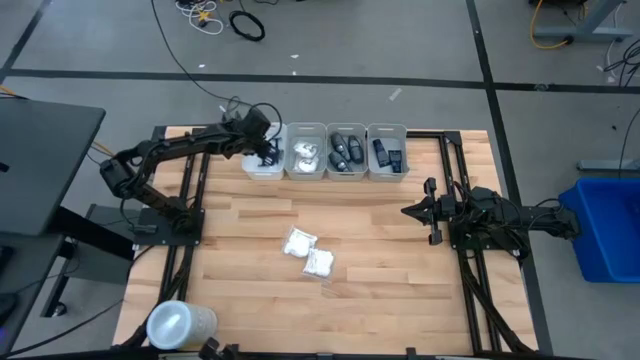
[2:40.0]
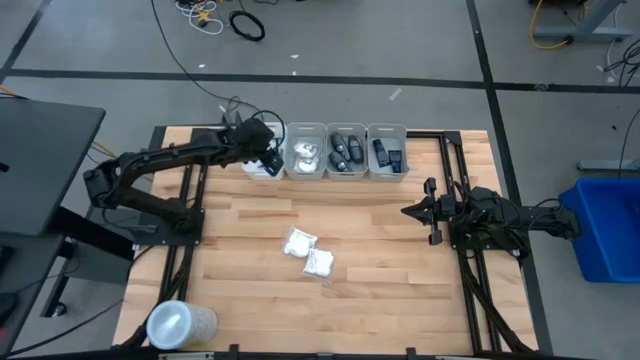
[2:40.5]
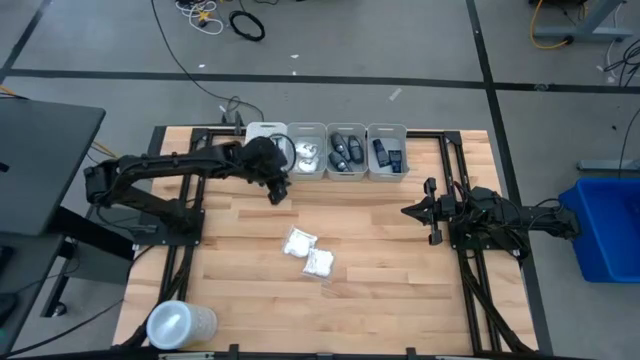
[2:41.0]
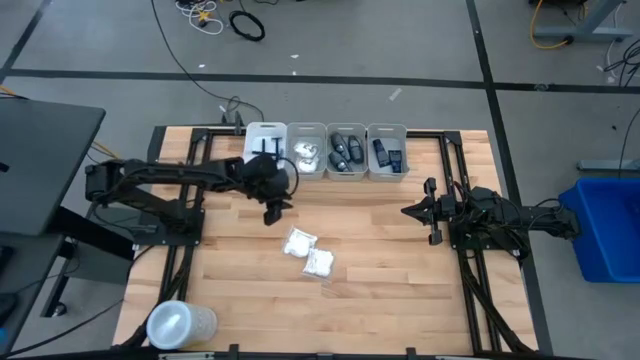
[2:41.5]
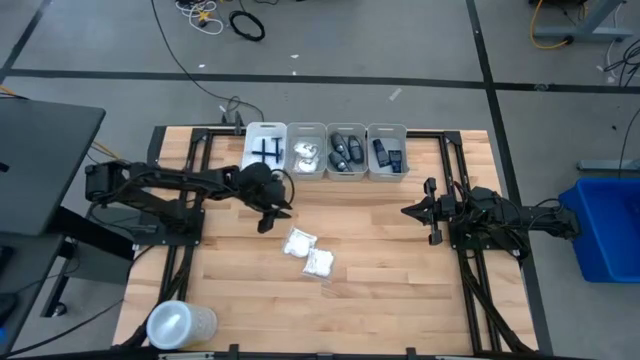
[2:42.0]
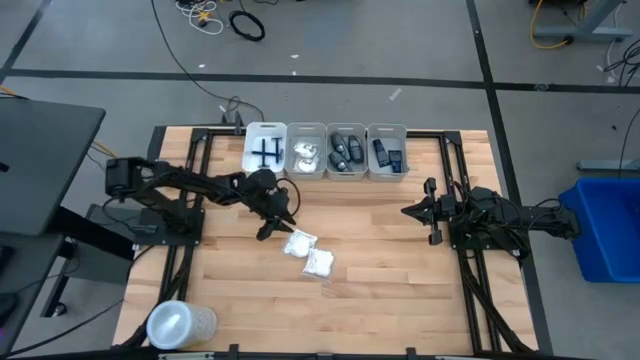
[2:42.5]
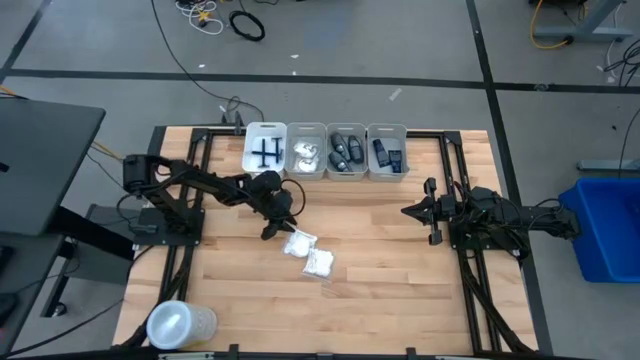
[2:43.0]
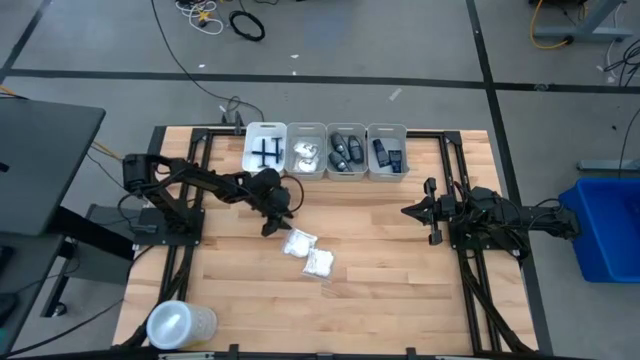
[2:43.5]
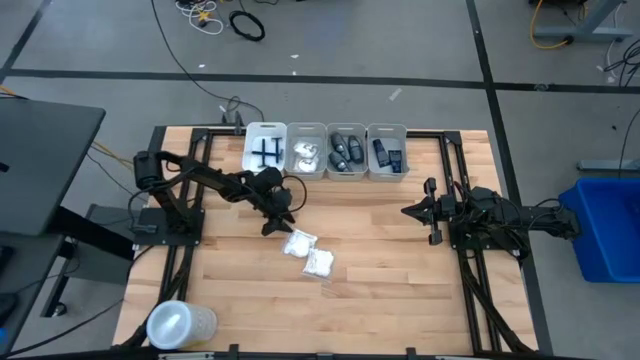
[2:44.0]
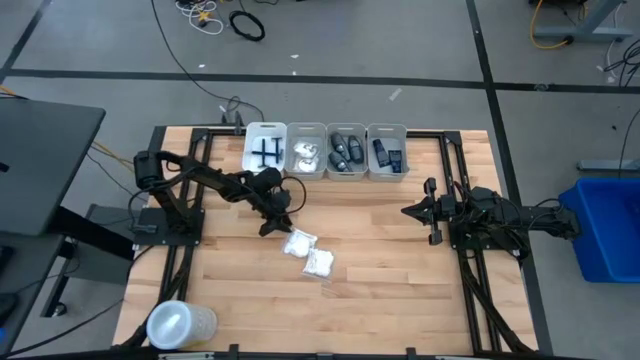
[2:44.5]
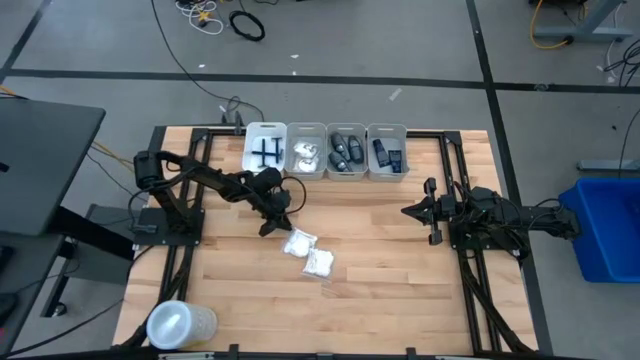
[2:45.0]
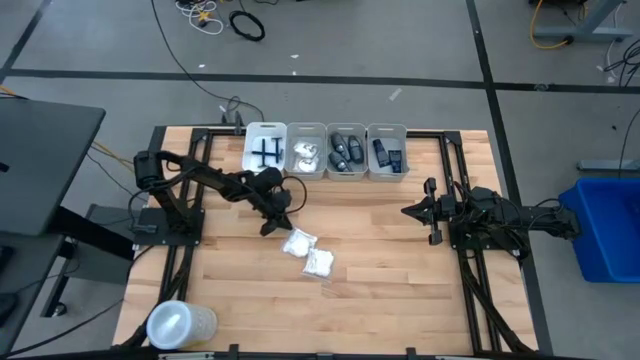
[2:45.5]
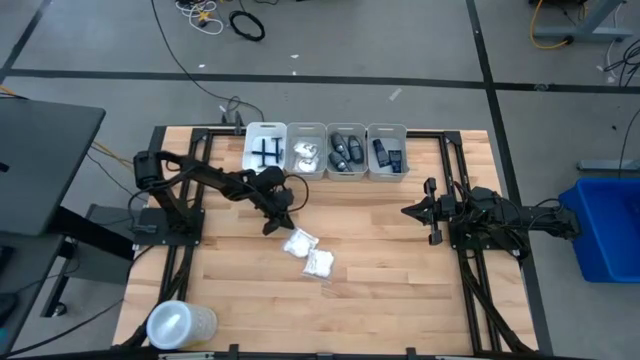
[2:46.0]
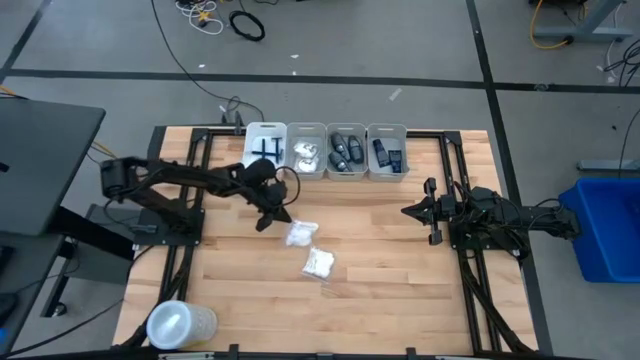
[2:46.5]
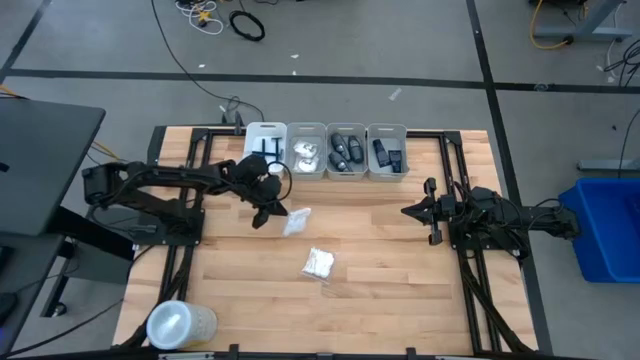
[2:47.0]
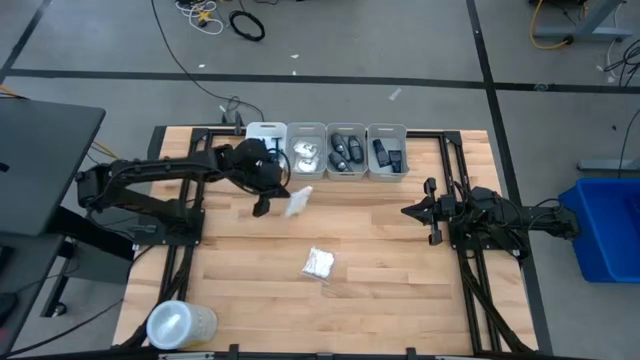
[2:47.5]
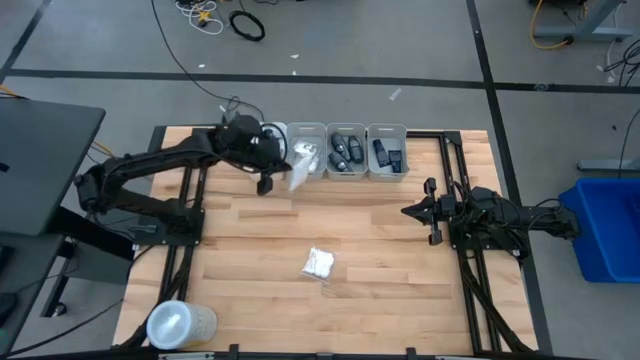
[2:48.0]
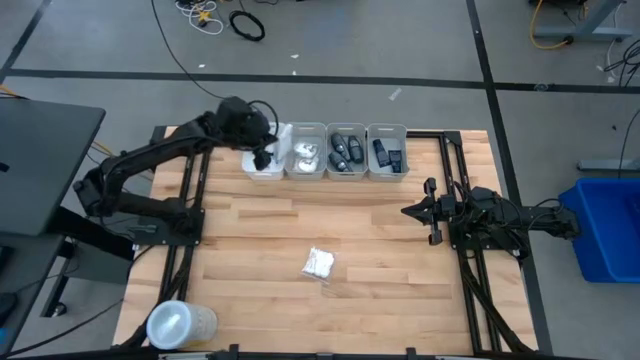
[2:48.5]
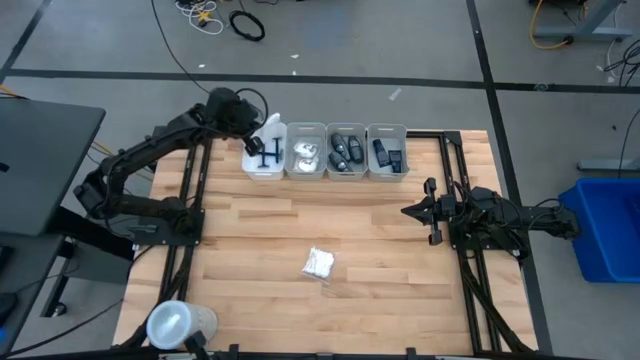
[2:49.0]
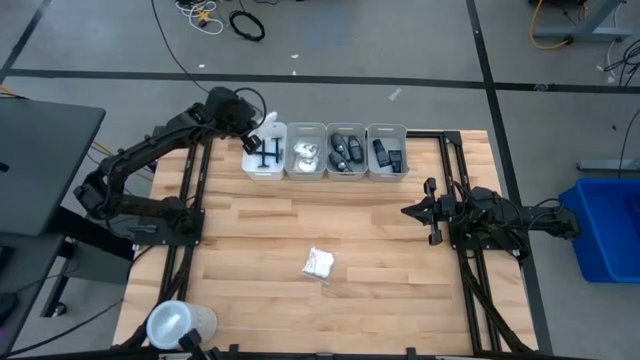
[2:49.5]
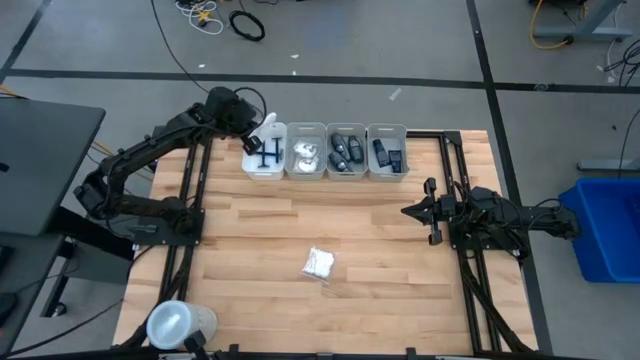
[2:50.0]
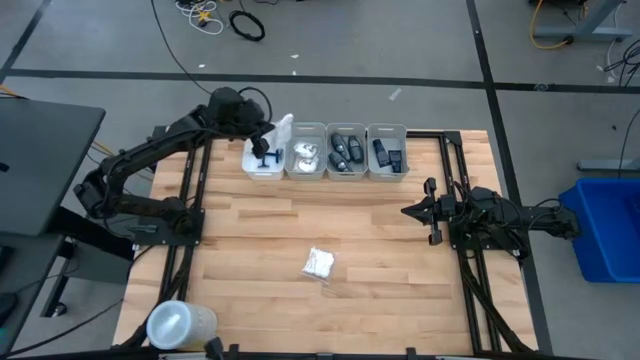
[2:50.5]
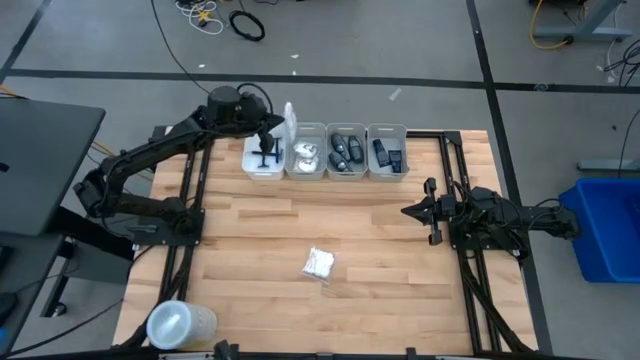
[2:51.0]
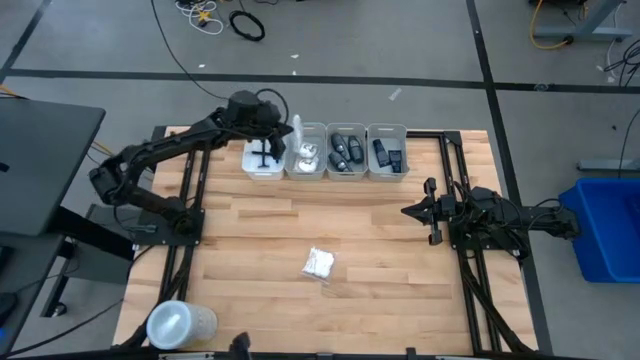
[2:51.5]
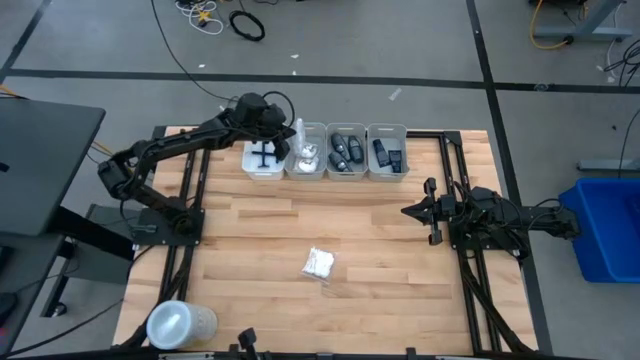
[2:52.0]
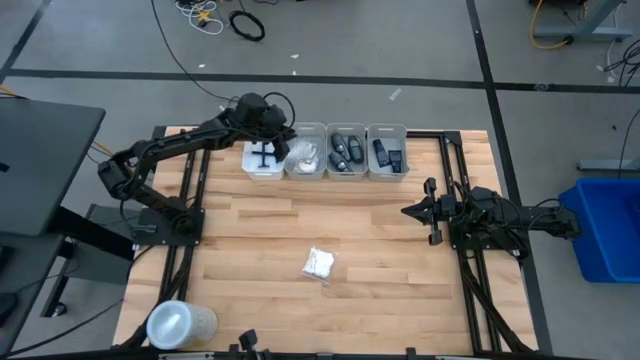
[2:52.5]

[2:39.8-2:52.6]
Task: Pick & Place Travel size toiletries
Put the white cotton pack into the left gray bin

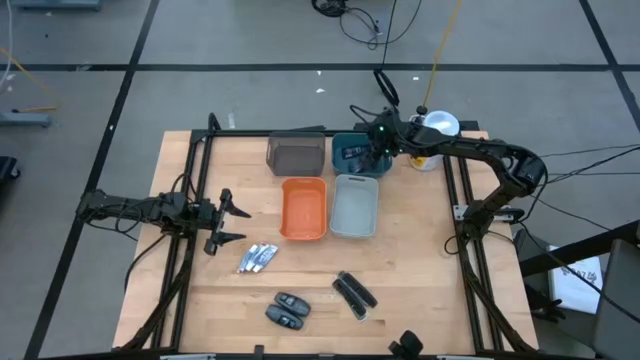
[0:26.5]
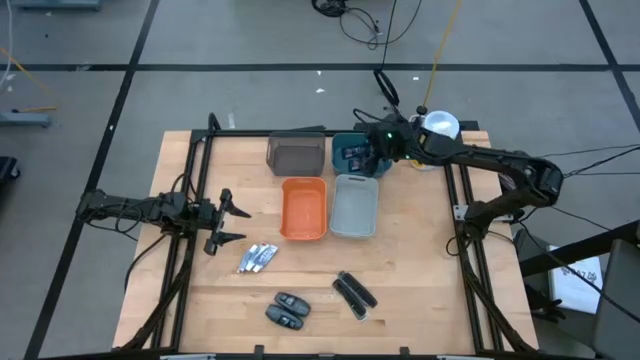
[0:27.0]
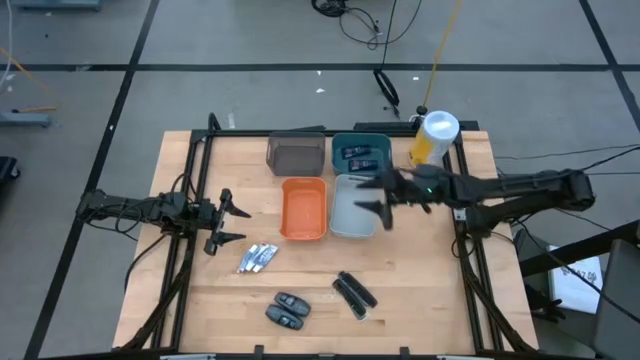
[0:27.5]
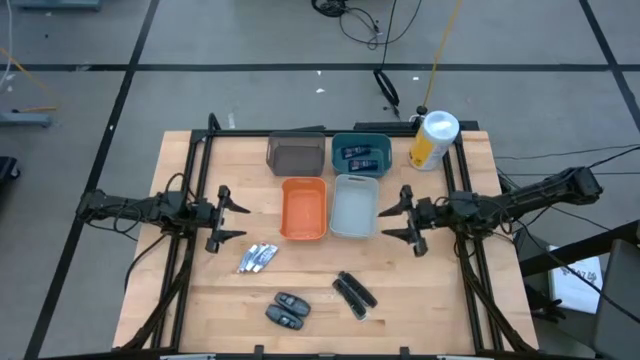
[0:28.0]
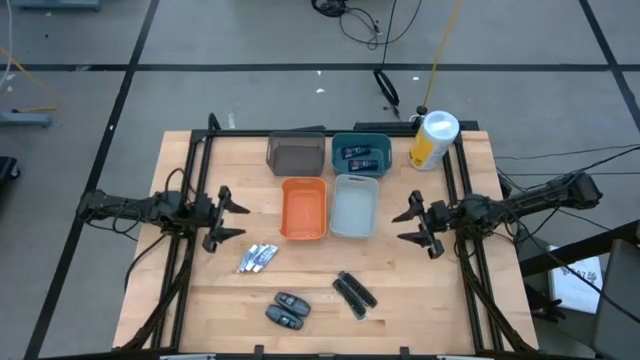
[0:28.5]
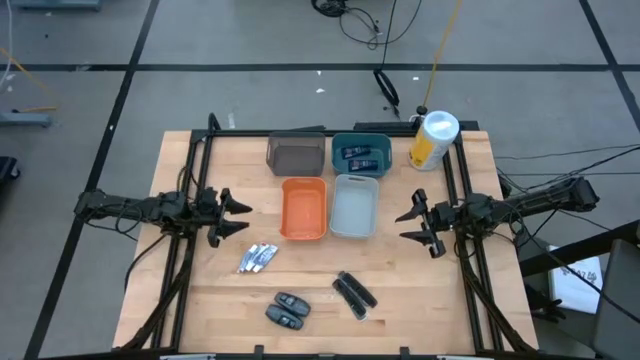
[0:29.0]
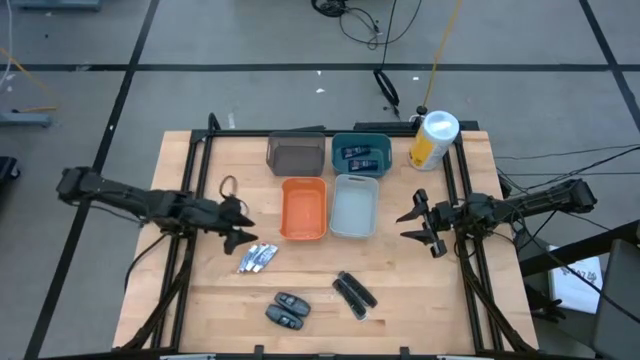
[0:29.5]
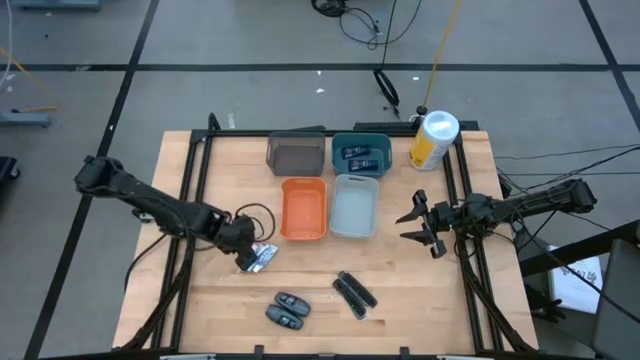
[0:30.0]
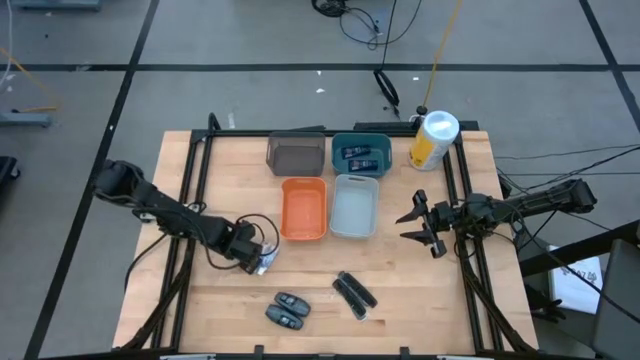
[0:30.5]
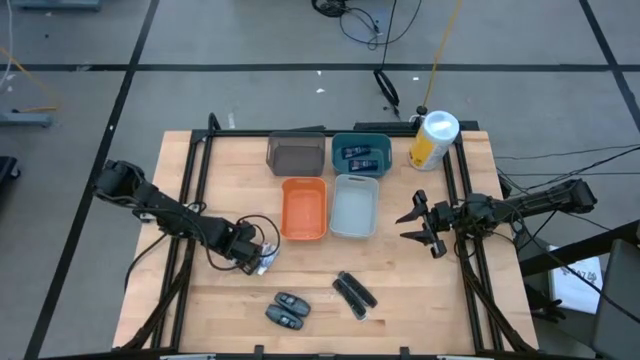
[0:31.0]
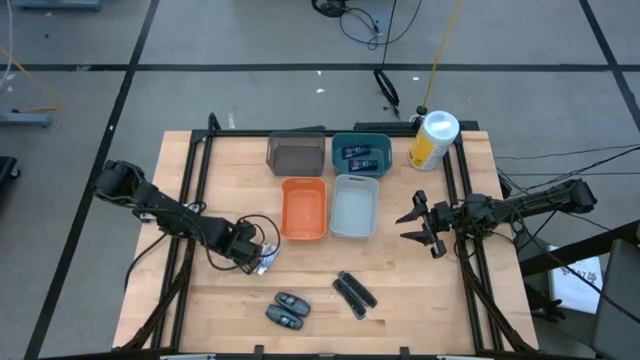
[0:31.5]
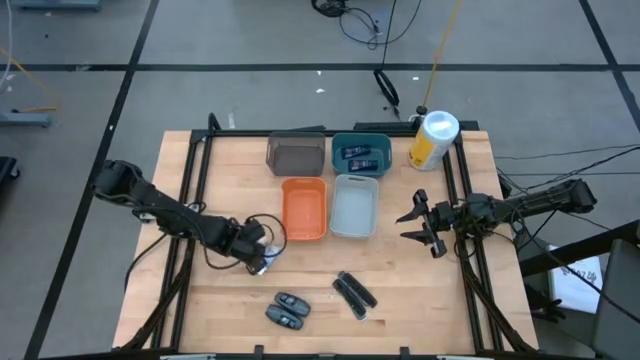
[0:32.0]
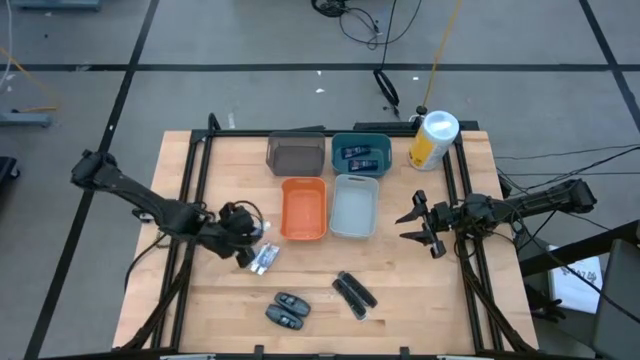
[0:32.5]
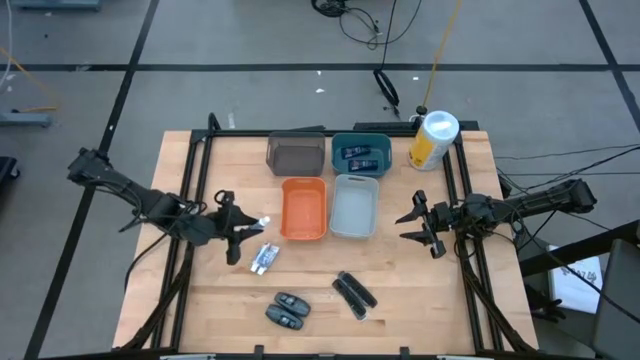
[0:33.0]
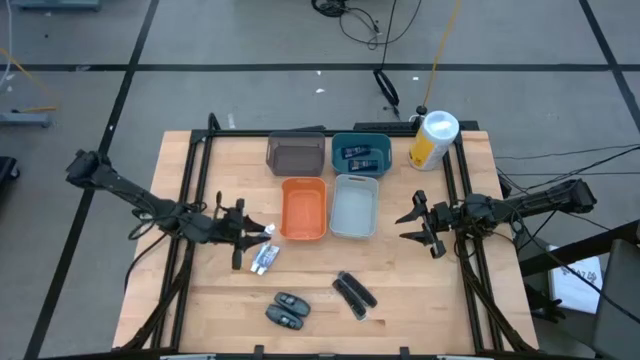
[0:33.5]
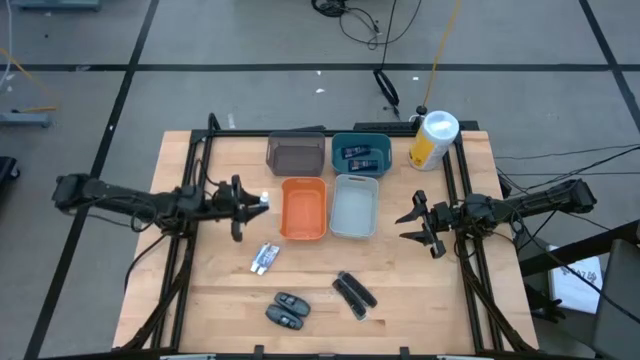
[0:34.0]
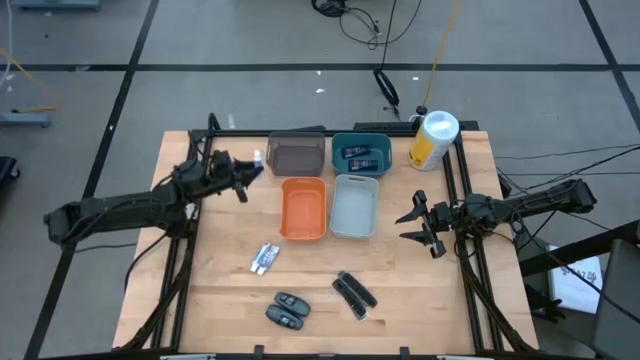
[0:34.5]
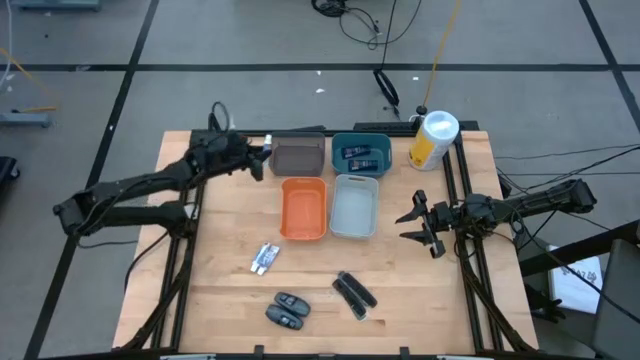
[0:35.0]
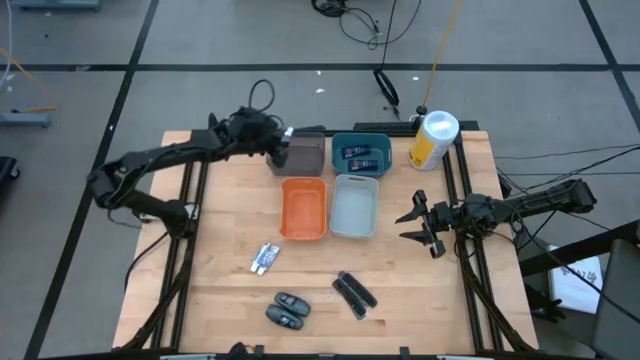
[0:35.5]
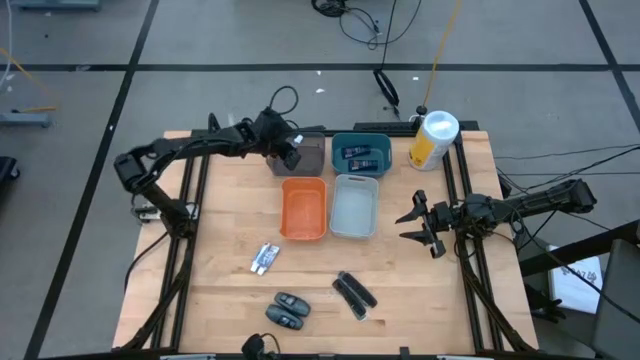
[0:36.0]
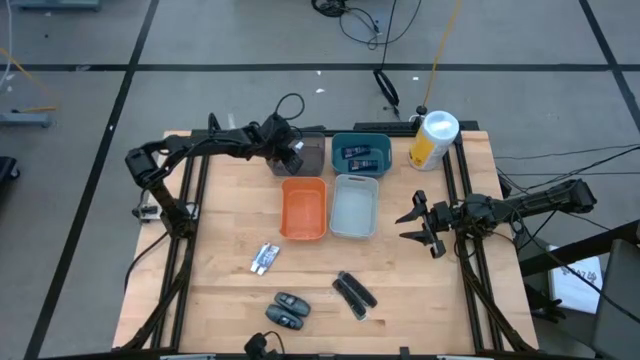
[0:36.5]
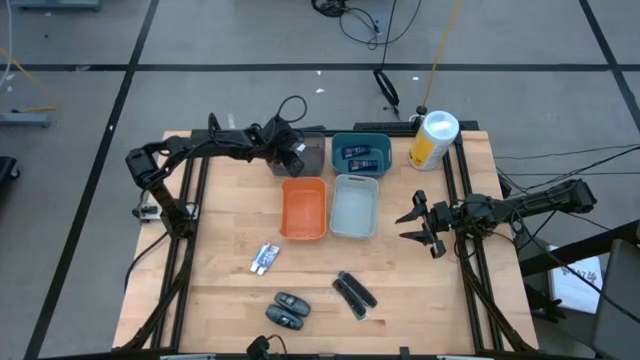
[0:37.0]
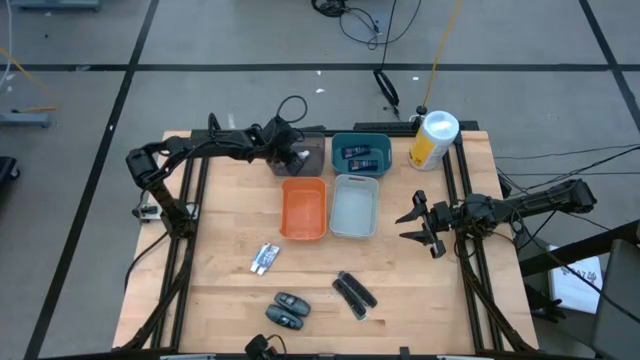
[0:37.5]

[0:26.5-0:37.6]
Task: Pick & Place Travel size toiletries
Put the left white toothpaste into the black transparent bin
